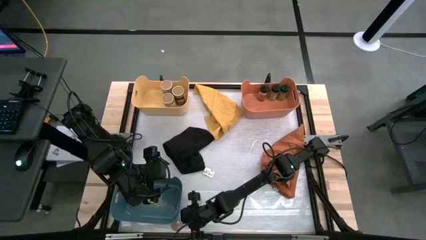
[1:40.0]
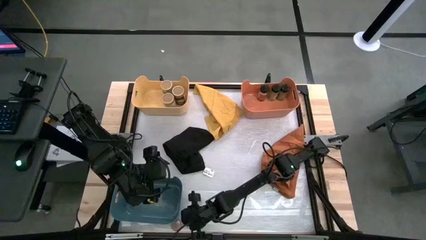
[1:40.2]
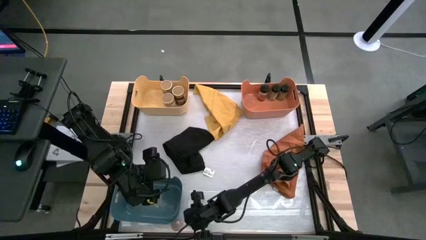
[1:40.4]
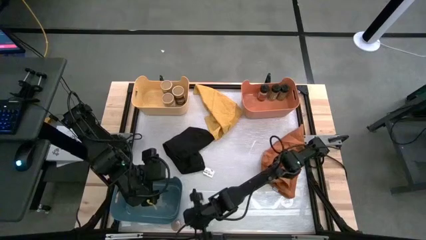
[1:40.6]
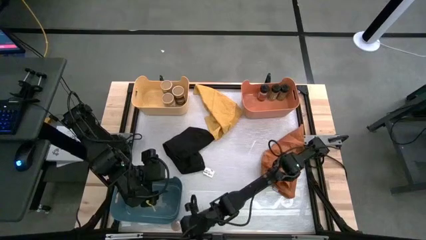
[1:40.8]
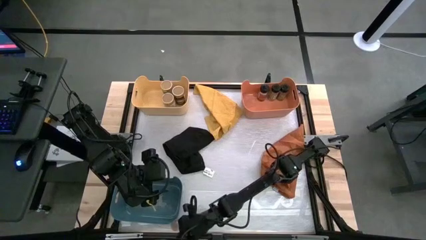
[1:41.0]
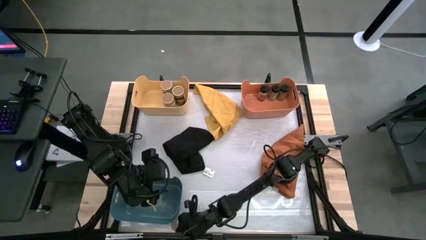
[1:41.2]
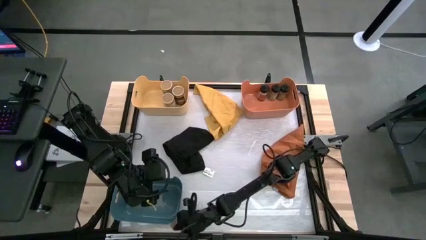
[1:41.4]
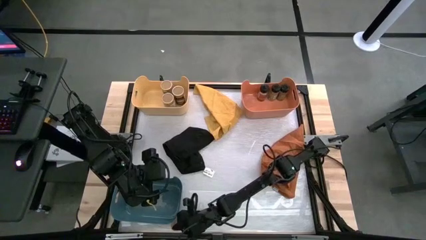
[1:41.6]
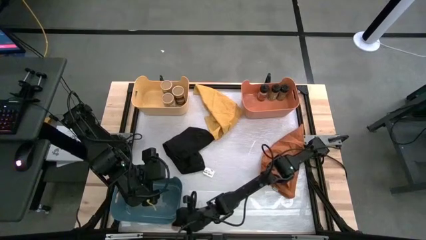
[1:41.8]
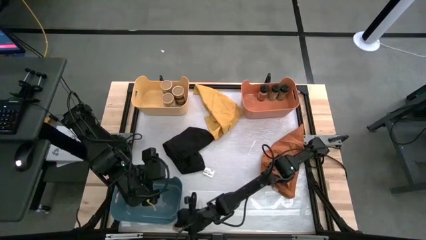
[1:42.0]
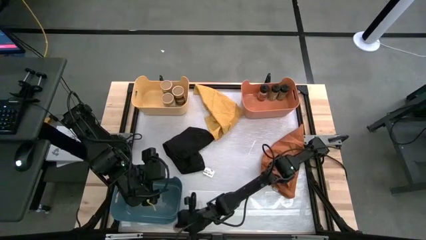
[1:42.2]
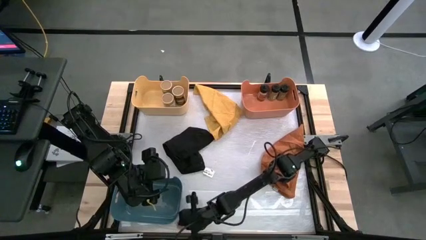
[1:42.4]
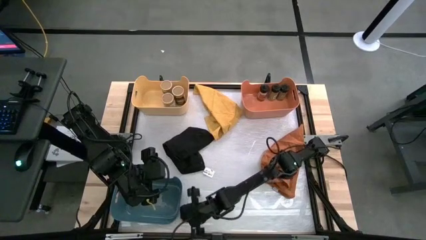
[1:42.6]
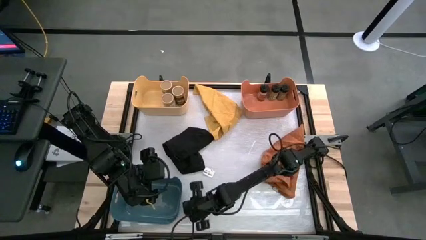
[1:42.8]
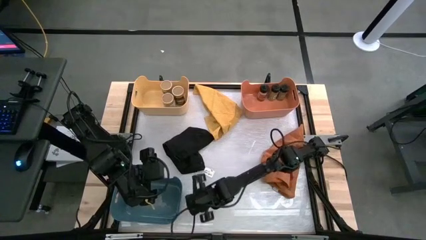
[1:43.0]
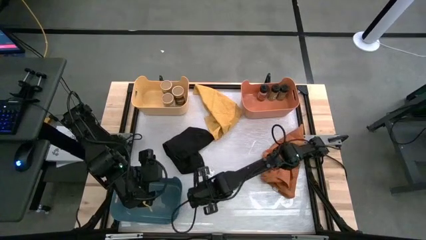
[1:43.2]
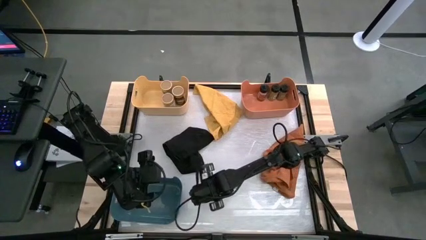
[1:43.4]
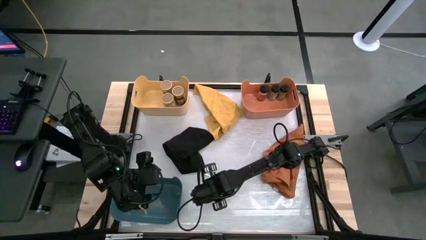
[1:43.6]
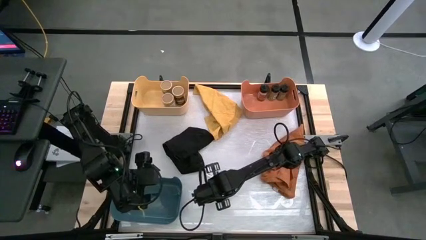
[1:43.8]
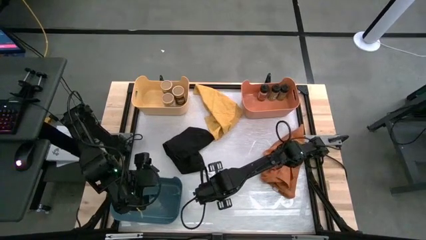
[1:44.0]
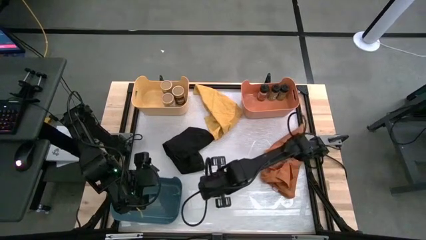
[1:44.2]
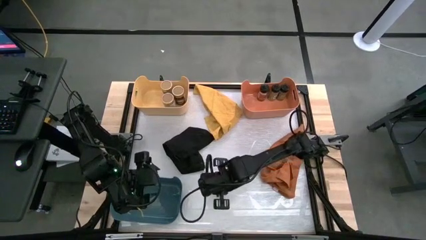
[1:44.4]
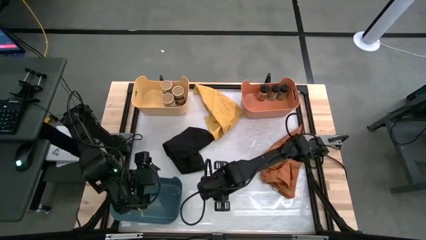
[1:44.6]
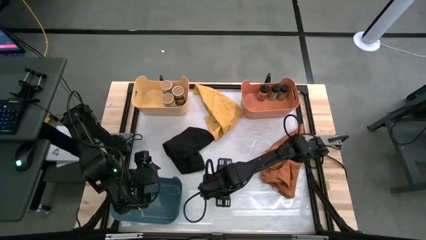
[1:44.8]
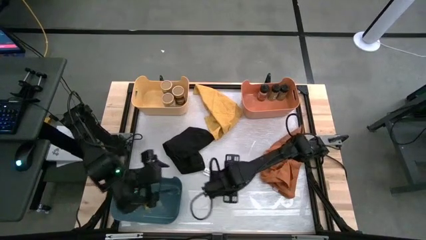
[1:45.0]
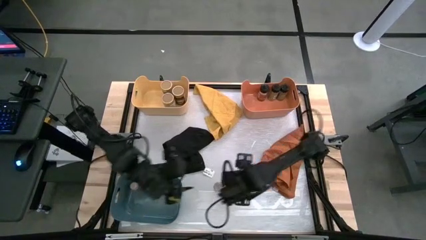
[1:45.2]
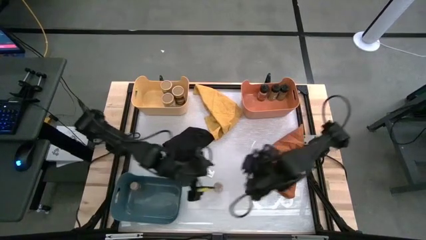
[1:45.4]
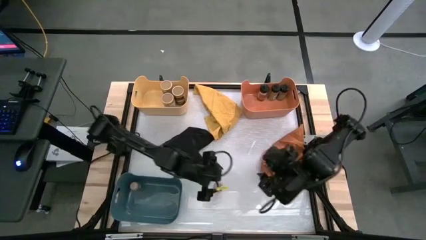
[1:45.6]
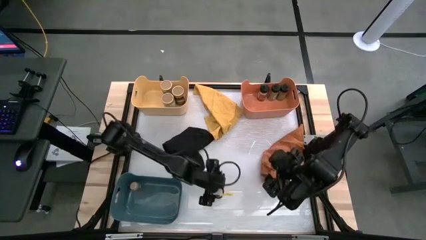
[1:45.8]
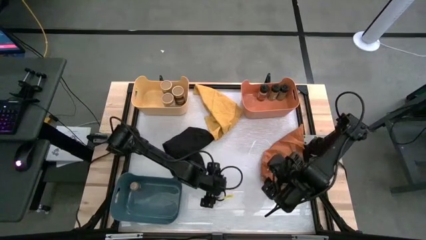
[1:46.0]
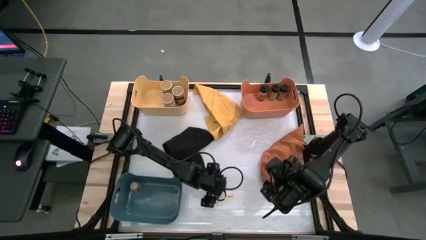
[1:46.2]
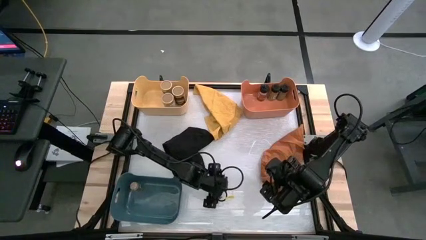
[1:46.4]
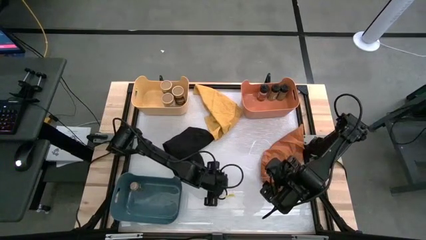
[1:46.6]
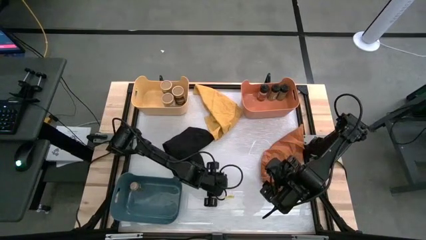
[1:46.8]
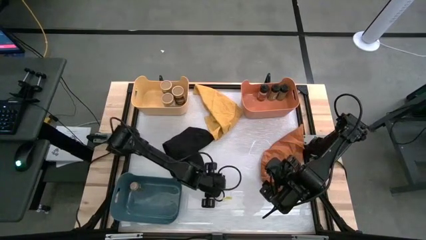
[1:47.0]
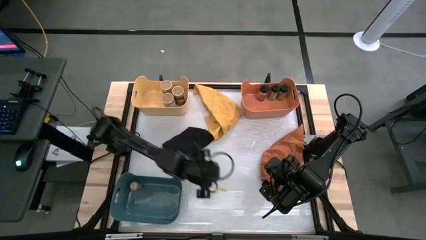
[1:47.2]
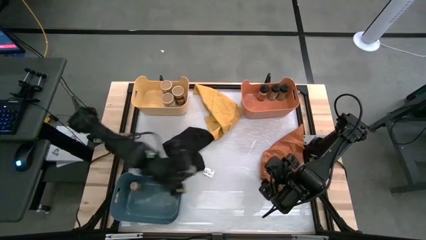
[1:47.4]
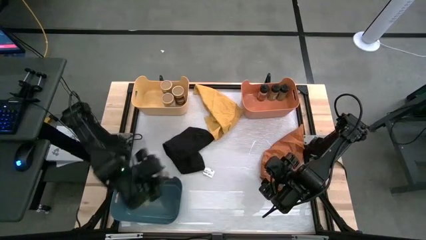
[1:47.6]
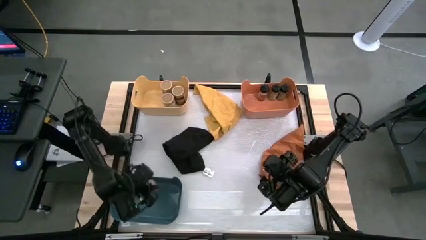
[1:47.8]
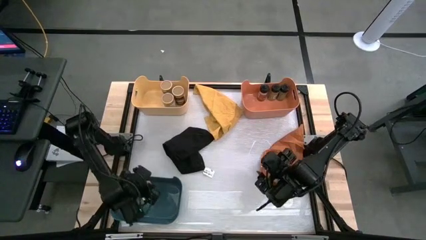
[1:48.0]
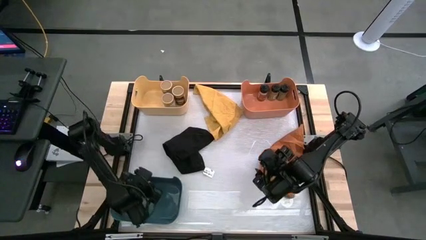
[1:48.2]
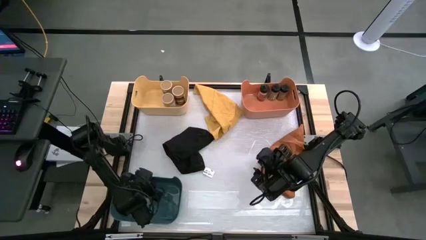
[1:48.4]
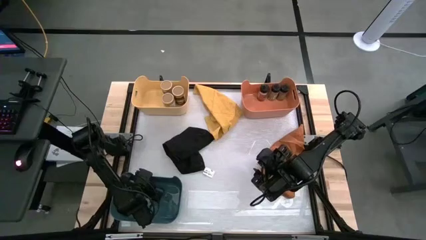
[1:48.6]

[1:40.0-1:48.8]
Task: Sort spices by type
Put the brown seasoning bottle into the blue bin

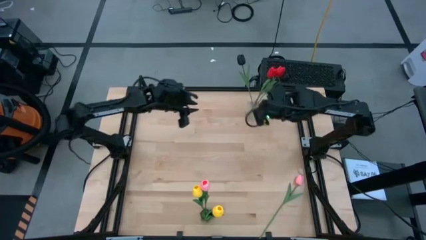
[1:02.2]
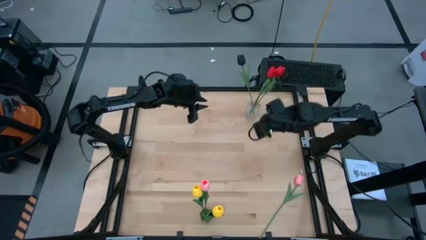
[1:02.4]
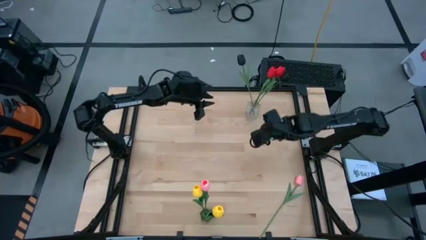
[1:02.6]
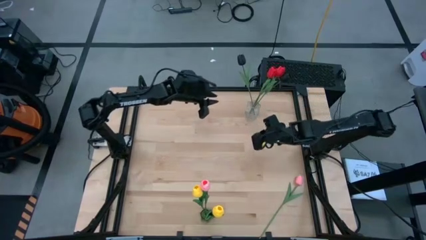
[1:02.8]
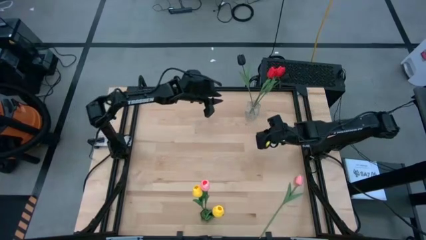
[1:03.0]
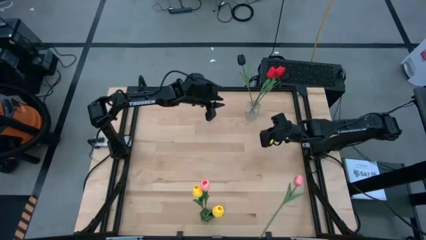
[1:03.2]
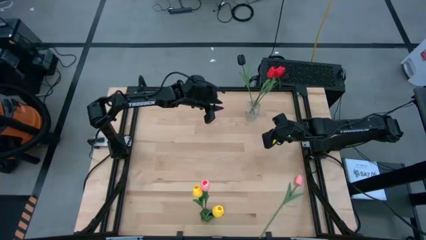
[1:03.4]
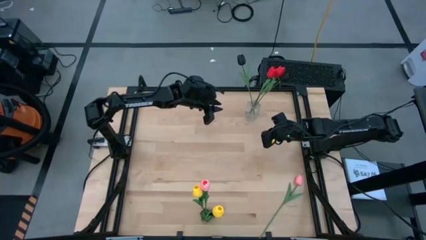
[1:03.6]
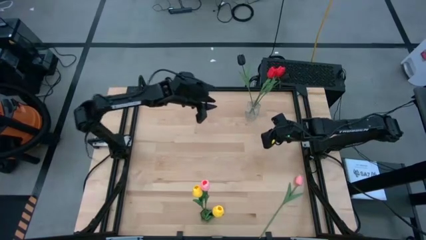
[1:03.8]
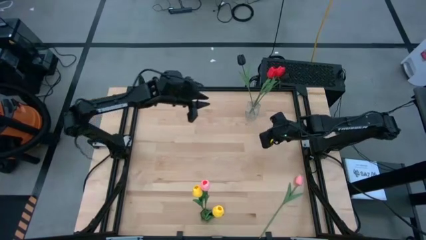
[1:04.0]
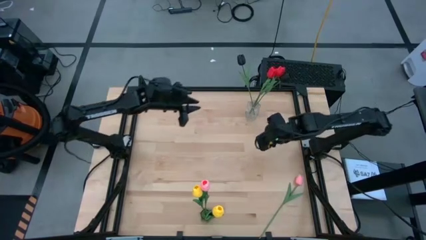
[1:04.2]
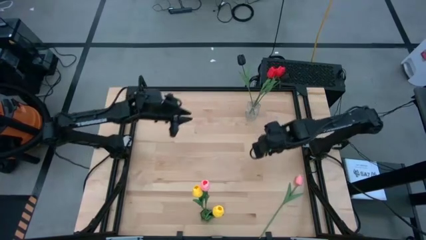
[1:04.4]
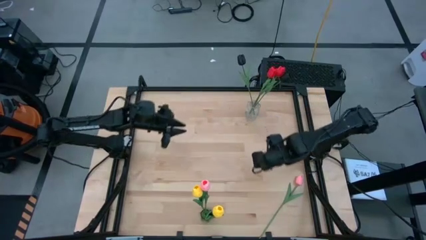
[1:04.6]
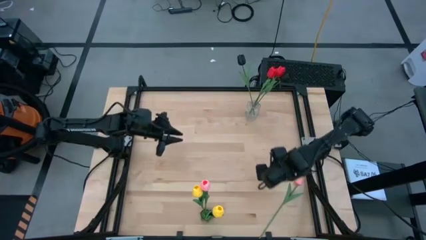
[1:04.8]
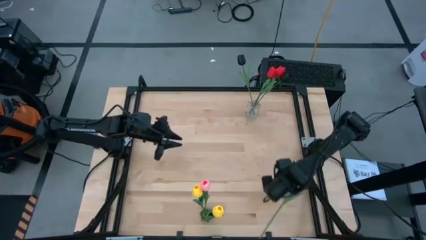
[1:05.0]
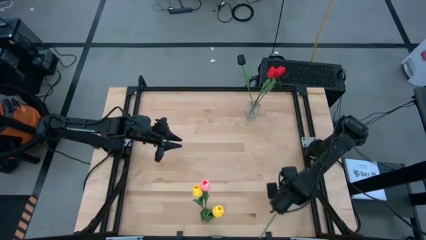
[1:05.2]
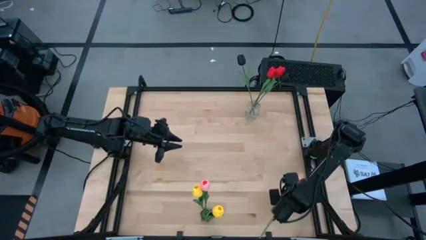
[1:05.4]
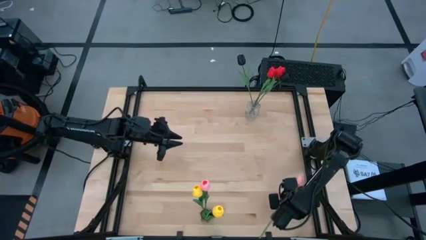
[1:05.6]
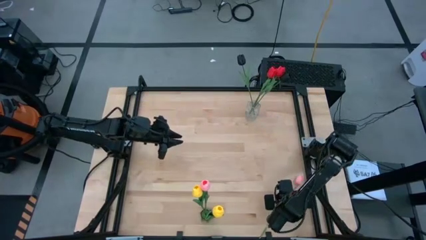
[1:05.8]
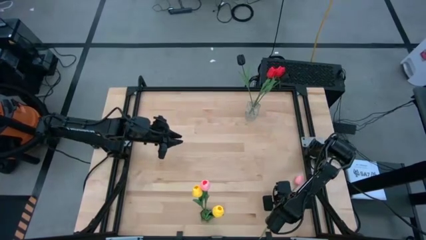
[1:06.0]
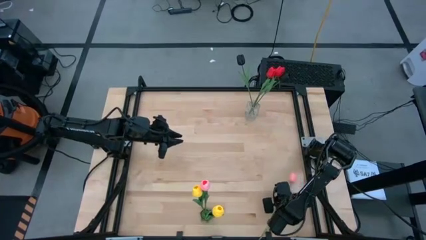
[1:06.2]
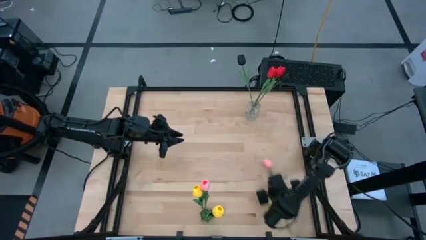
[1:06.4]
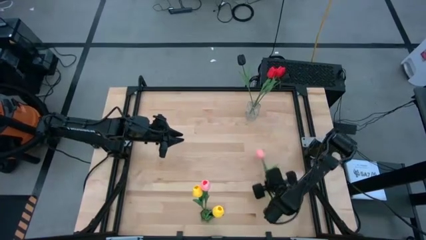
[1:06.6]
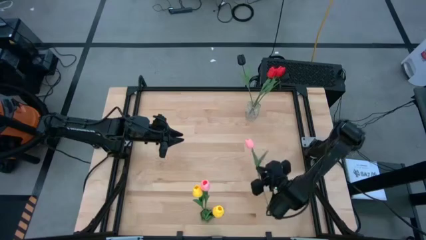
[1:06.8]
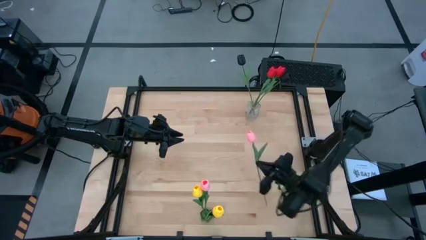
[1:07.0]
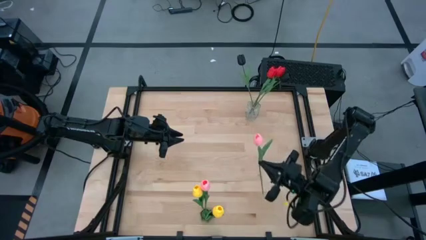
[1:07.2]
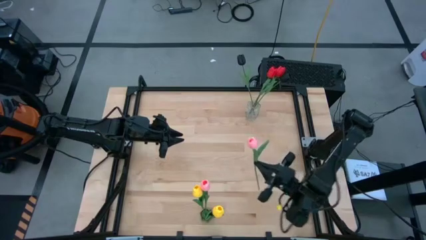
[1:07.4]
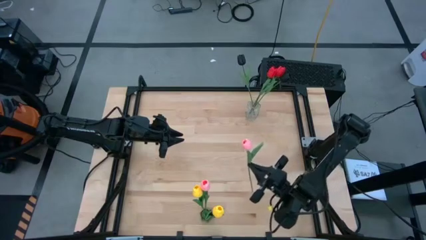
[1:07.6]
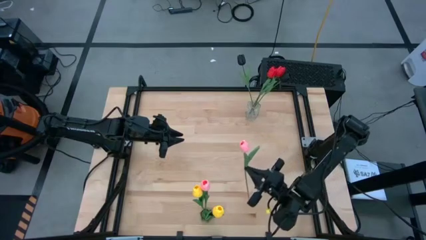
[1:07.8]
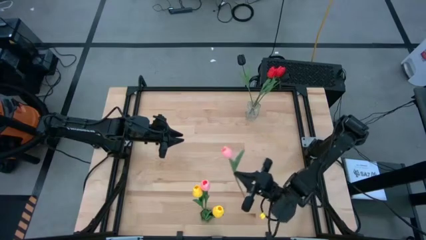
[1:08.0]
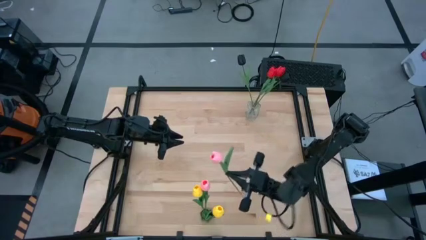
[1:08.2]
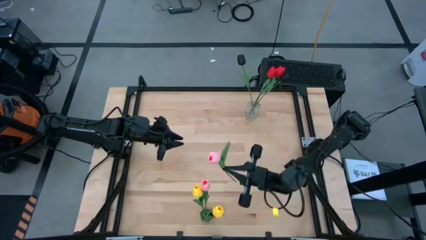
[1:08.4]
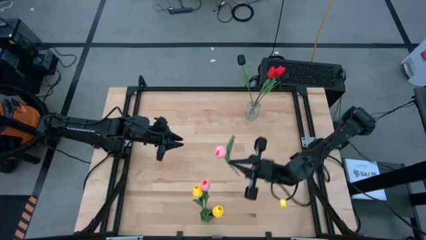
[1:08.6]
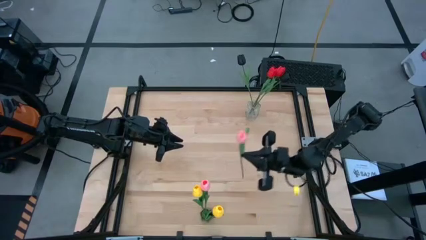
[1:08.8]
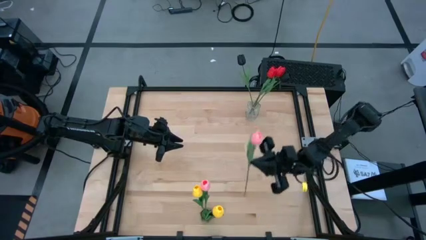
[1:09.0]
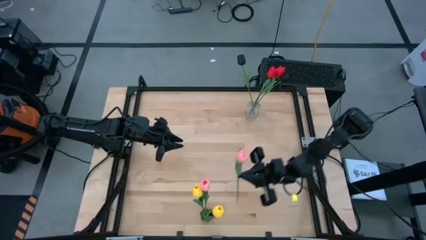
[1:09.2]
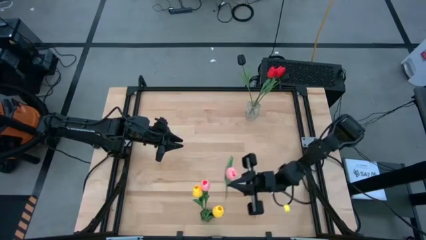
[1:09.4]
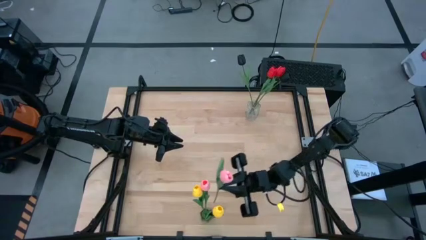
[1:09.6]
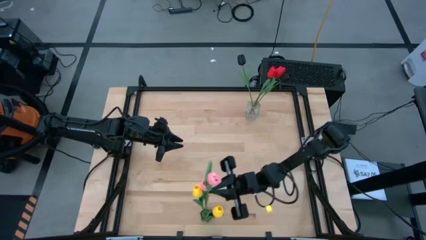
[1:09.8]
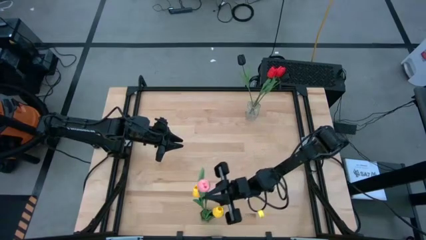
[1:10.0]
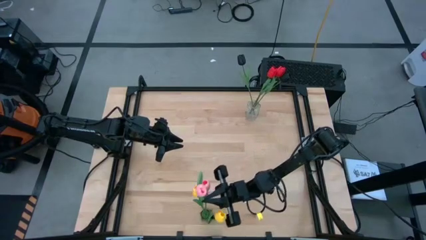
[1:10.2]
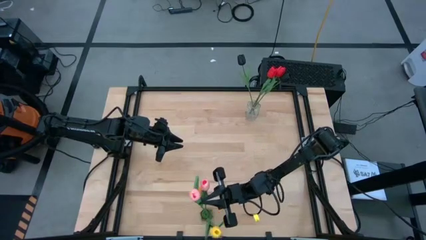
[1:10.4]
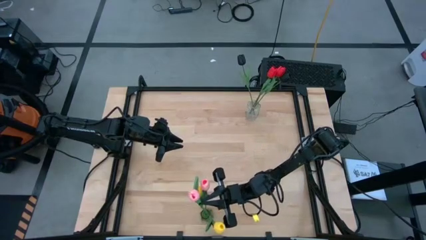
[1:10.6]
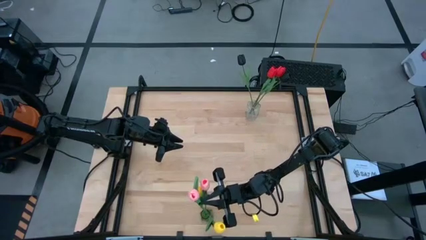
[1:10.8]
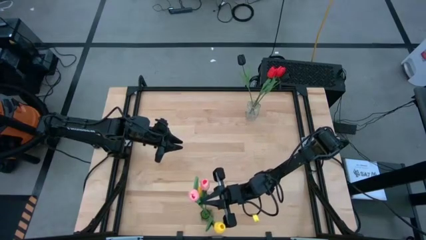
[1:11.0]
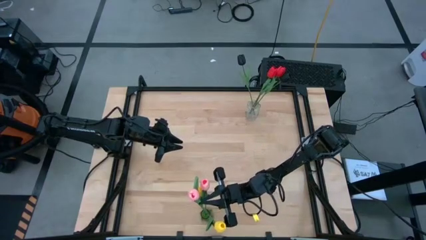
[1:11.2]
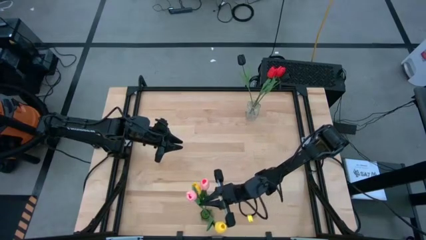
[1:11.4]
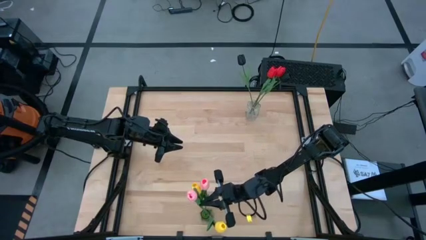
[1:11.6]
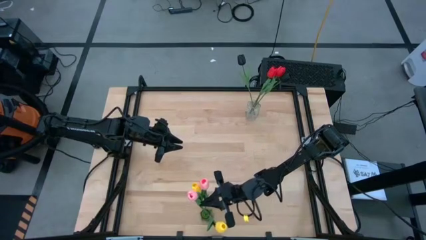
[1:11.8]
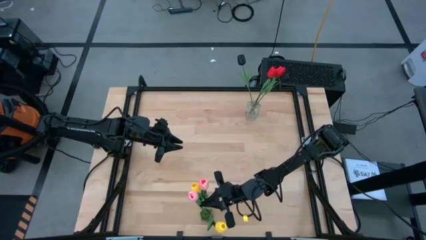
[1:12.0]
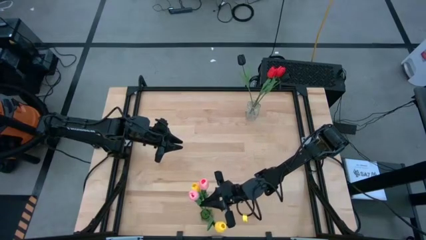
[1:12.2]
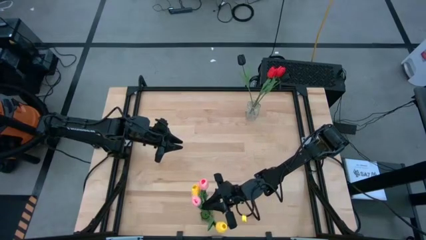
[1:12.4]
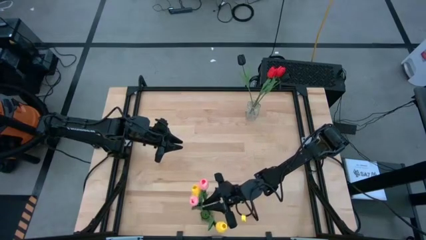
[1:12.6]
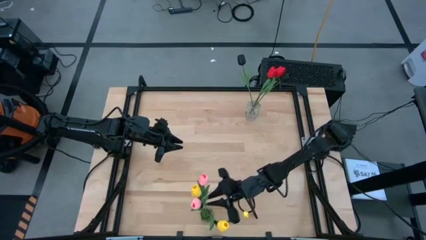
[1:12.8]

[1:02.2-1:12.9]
Task: Sort flowers into vase by color
Put the pink flower into the green vase
